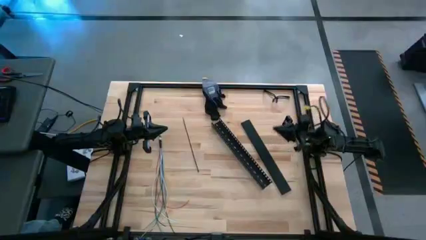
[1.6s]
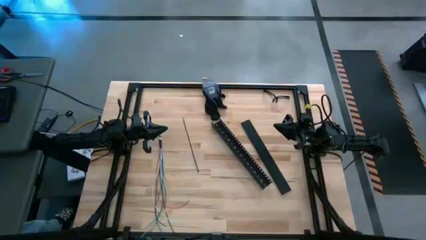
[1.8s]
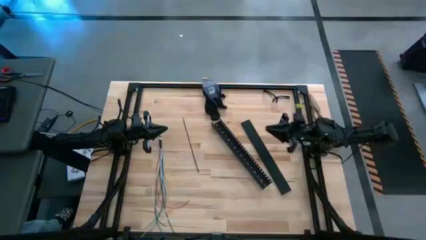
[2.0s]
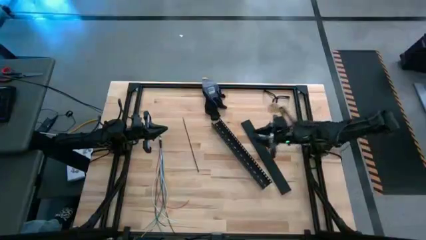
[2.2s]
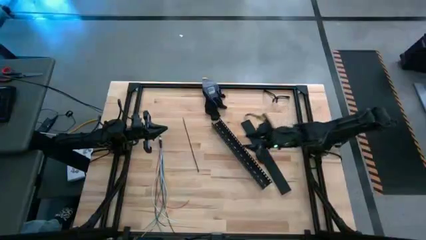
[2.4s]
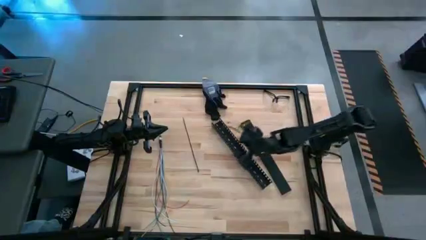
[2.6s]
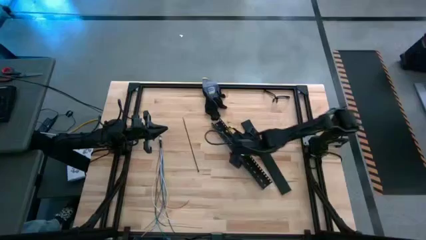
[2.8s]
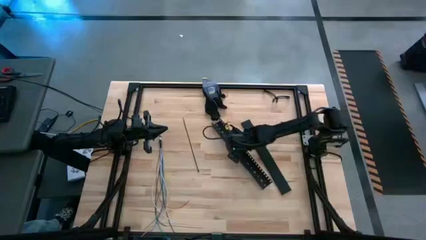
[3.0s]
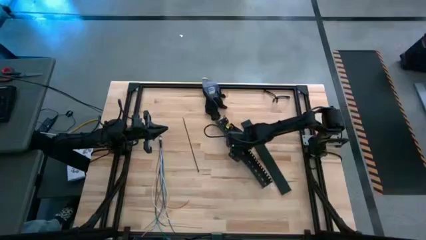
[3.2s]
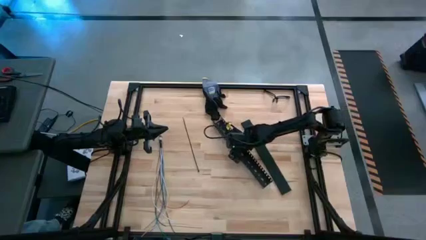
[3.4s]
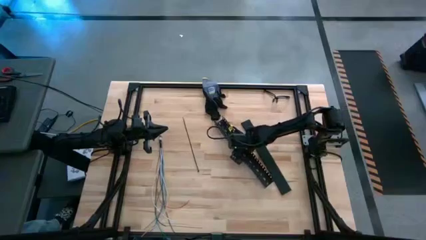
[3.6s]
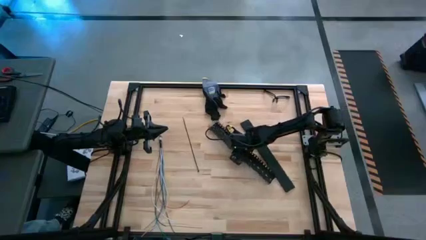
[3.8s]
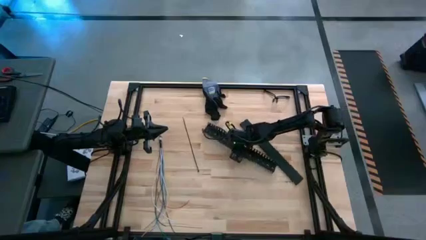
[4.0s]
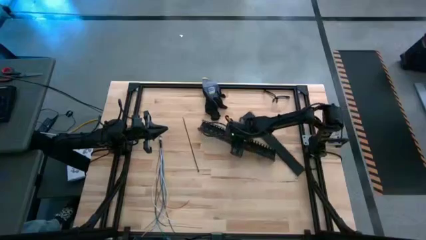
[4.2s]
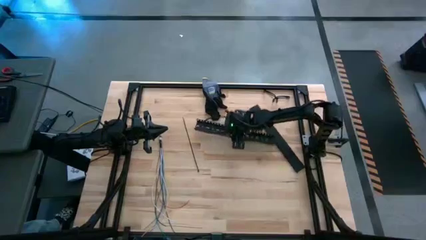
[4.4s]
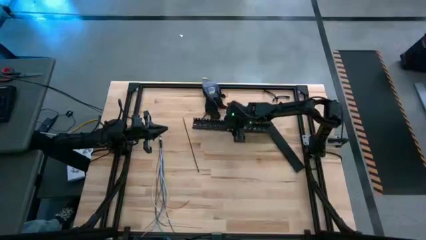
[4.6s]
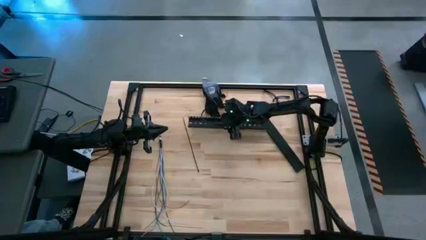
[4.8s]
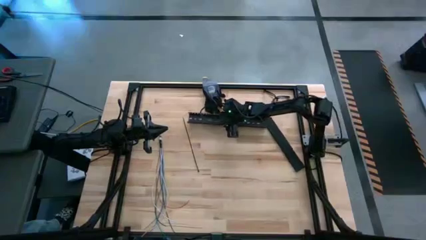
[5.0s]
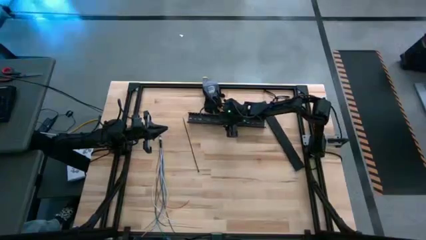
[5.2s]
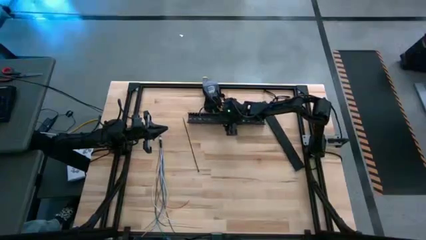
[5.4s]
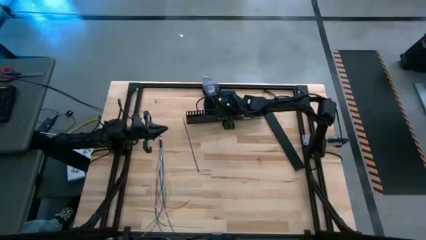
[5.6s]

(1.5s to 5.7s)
Task: Ziptie cables
Move the black cable duct to the top center of the table

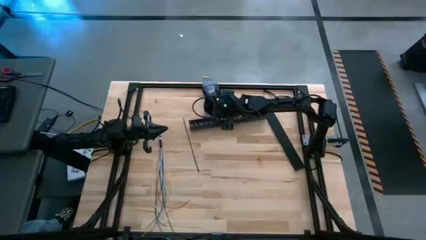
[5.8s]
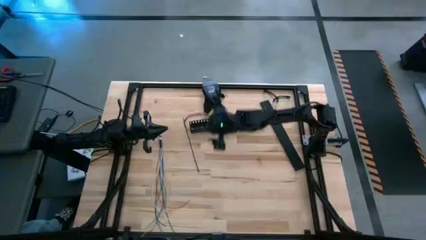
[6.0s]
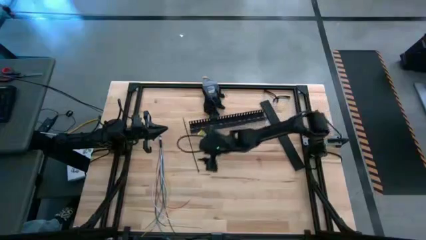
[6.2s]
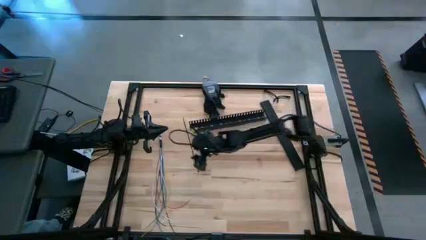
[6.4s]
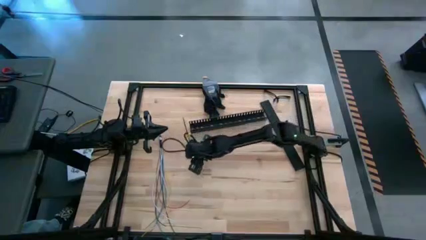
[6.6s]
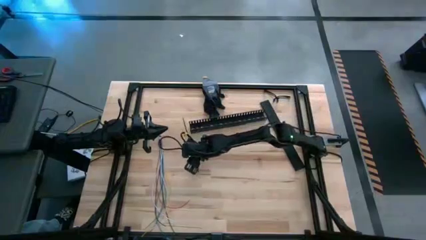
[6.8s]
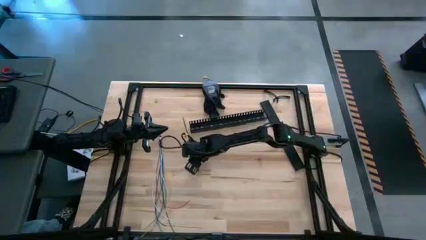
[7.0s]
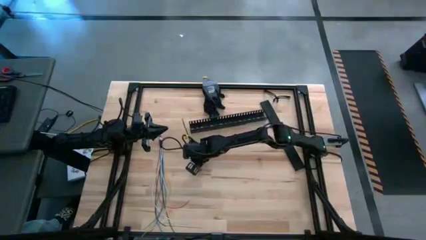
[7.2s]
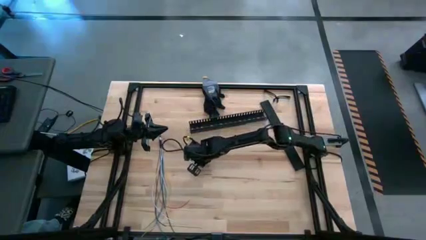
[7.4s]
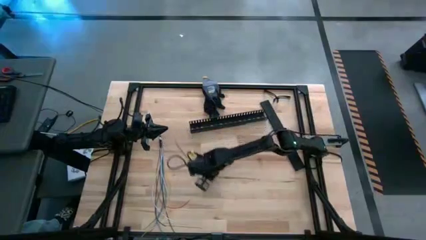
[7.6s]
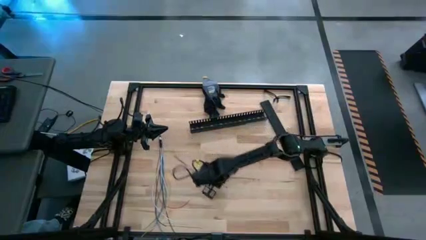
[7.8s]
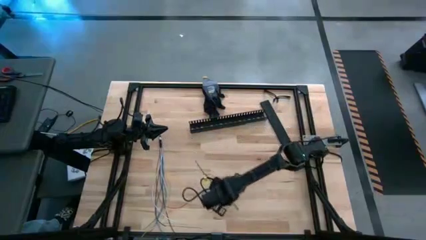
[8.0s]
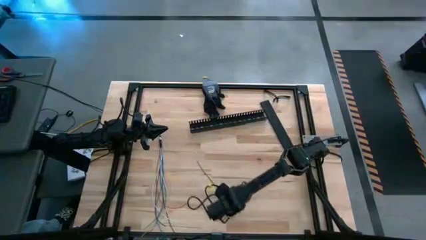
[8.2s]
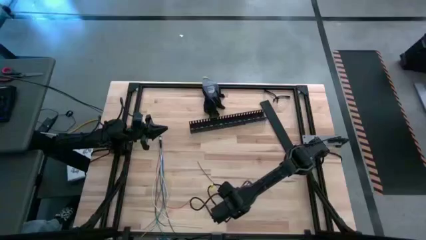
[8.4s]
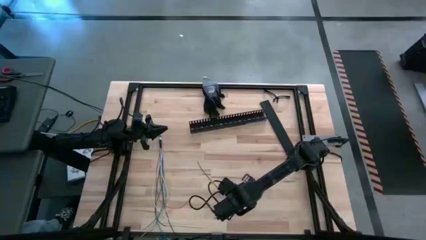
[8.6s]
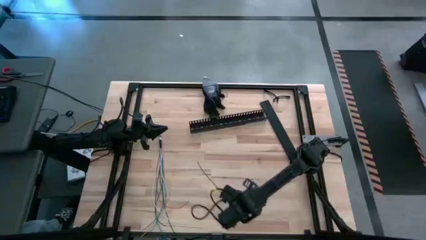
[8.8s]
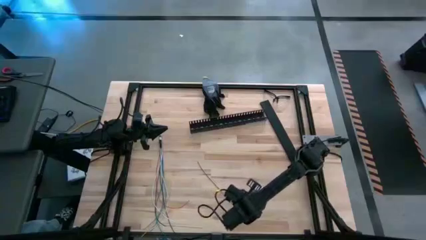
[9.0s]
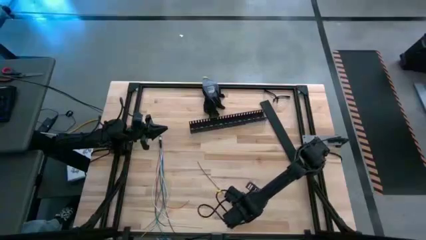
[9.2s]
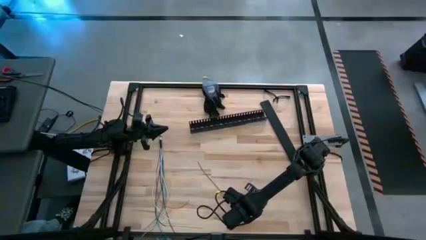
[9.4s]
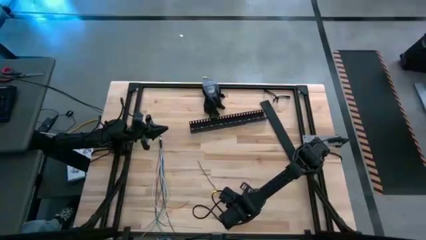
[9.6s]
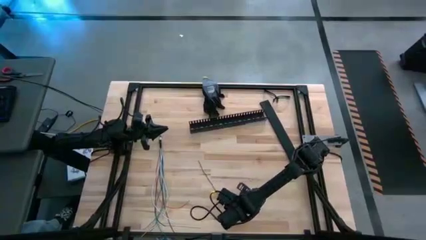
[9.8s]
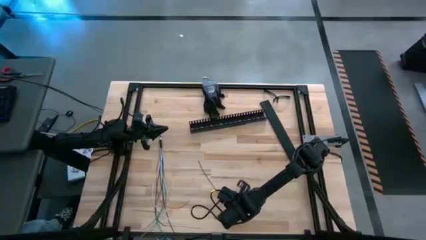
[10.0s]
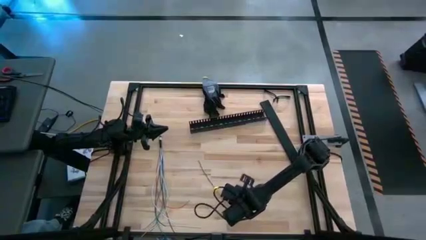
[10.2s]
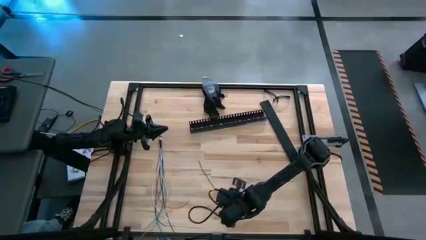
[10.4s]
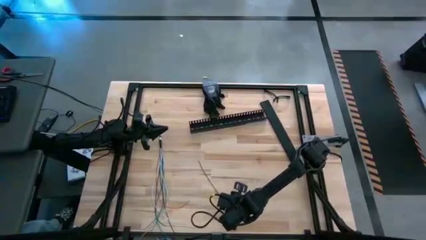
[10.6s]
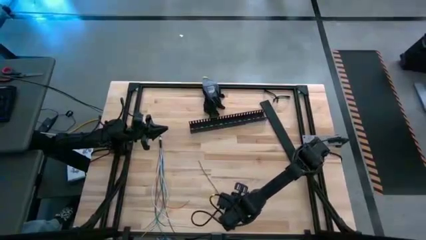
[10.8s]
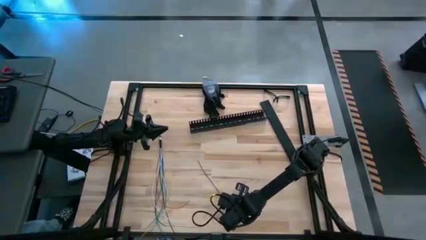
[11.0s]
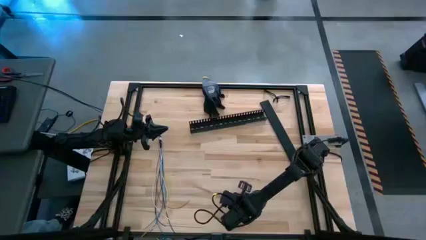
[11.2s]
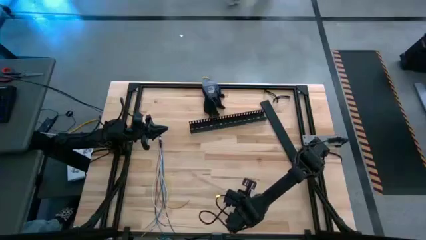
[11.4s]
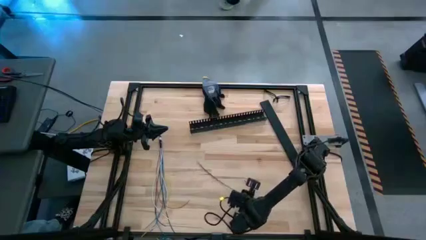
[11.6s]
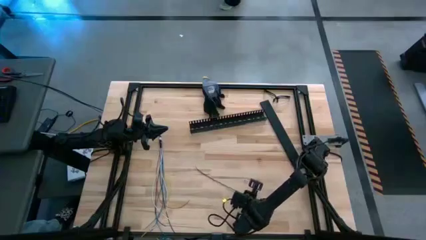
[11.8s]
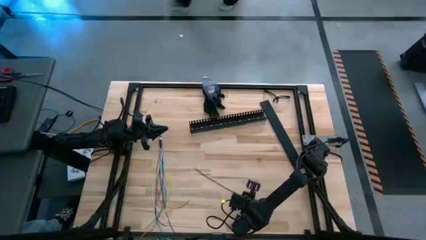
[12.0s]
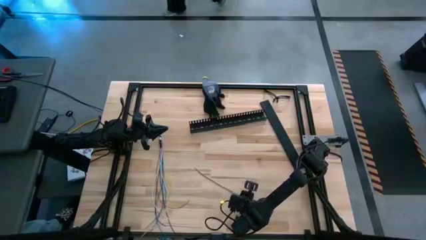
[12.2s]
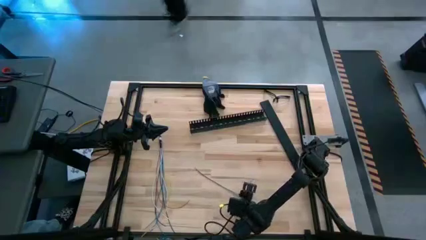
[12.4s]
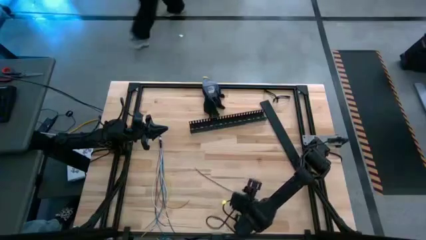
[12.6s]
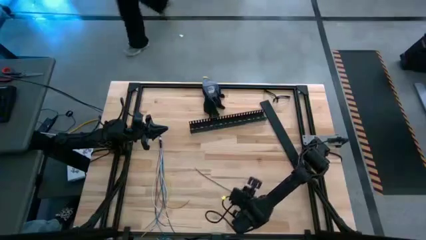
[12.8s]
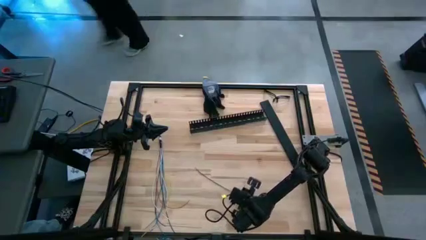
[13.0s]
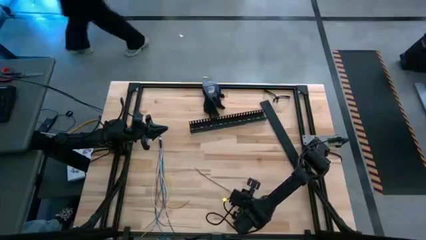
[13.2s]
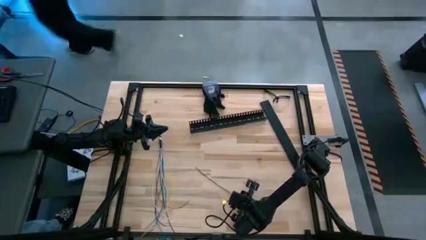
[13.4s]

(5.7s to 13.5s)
Move the black zip tie to the bottom center of the table

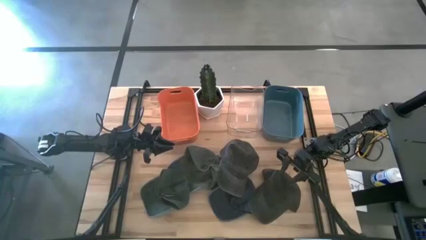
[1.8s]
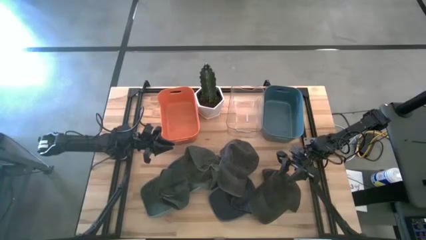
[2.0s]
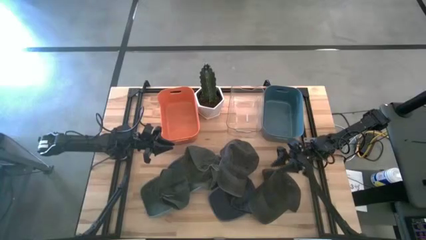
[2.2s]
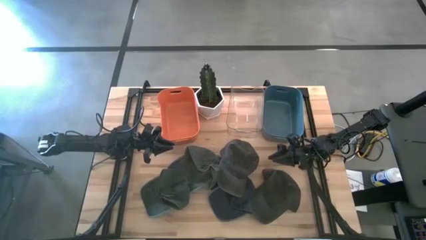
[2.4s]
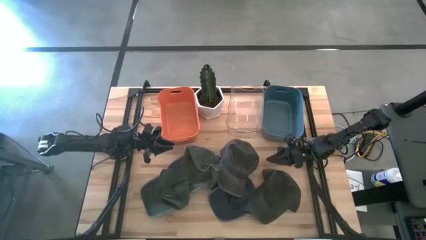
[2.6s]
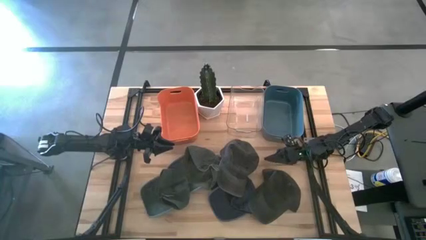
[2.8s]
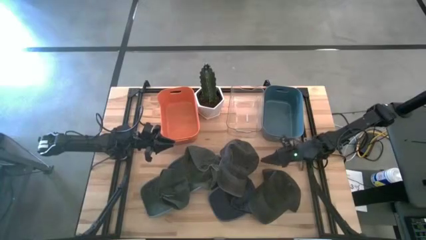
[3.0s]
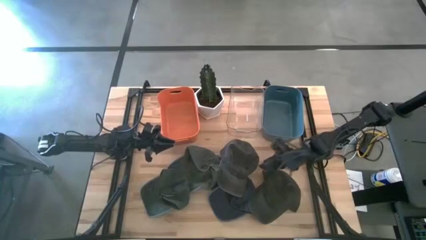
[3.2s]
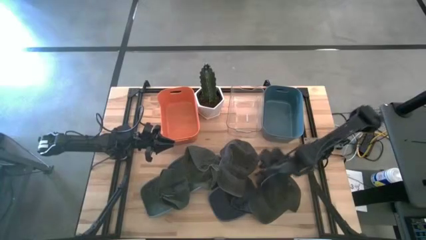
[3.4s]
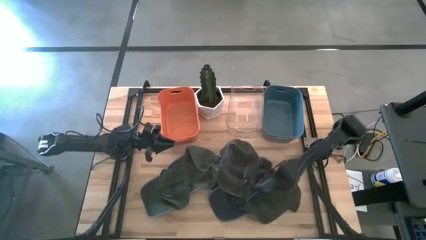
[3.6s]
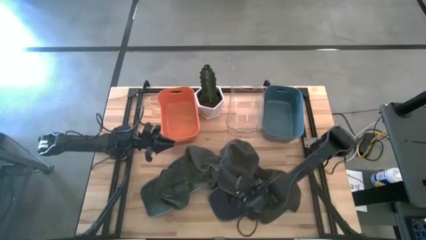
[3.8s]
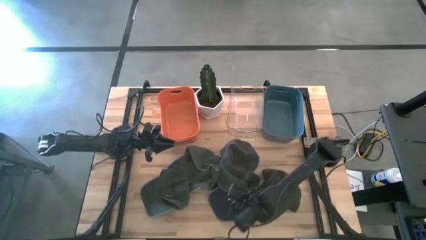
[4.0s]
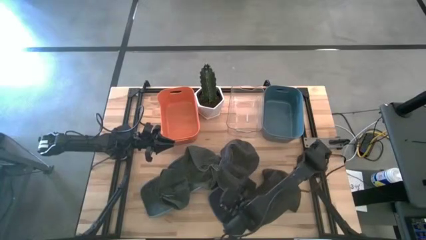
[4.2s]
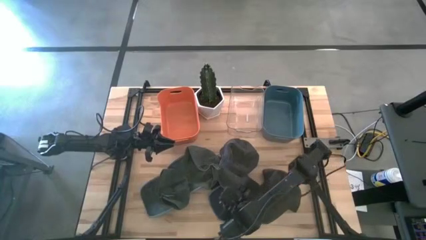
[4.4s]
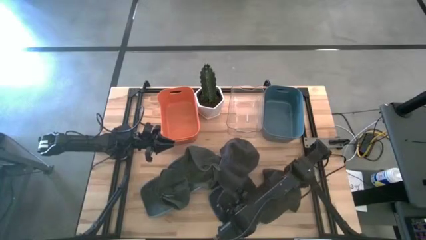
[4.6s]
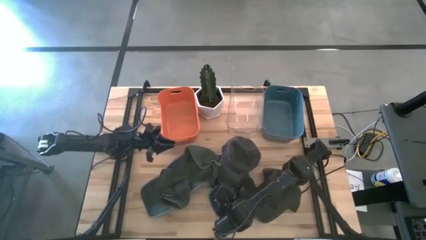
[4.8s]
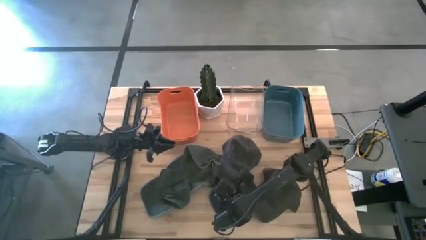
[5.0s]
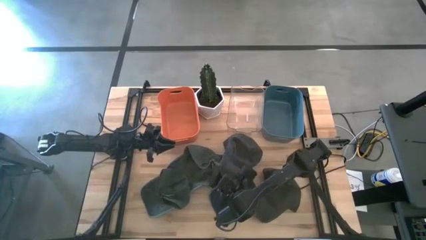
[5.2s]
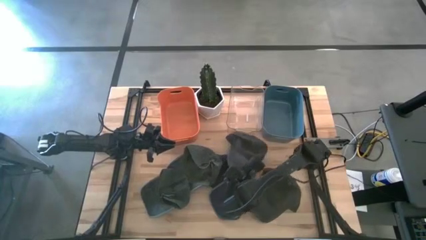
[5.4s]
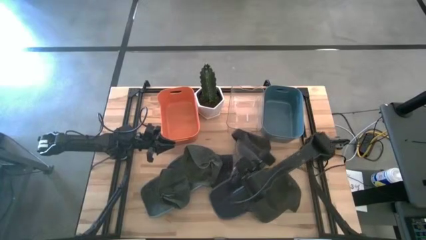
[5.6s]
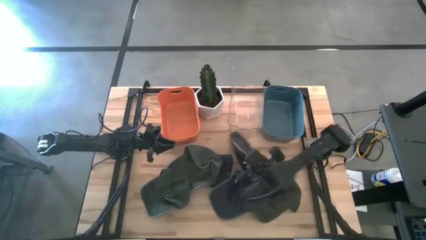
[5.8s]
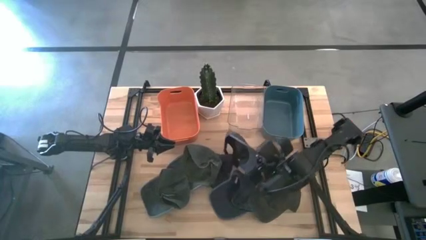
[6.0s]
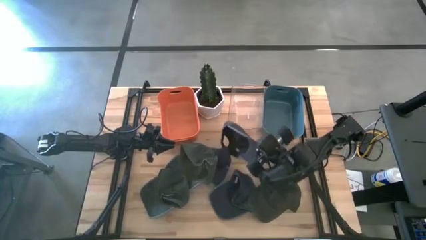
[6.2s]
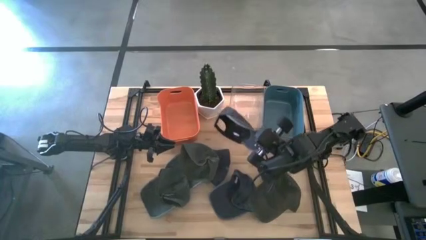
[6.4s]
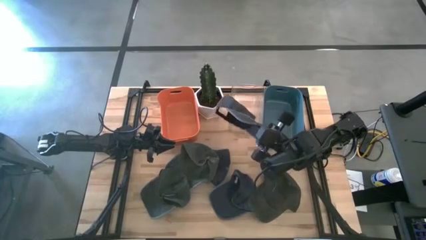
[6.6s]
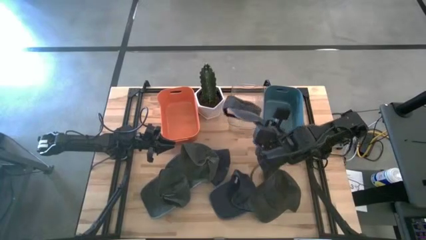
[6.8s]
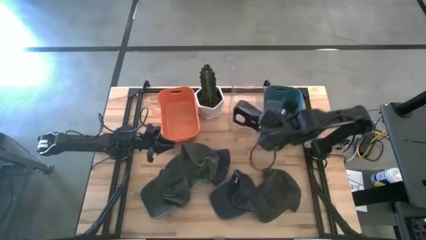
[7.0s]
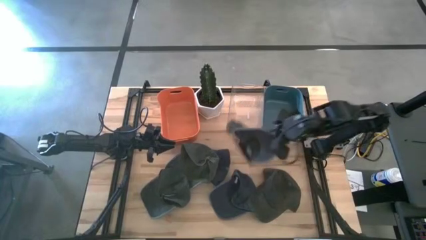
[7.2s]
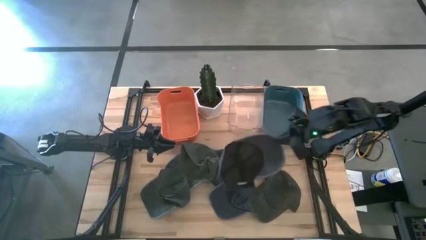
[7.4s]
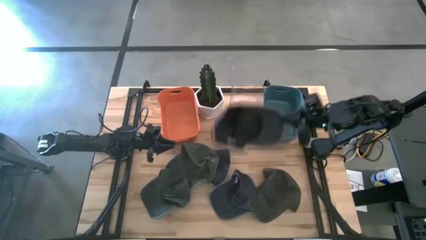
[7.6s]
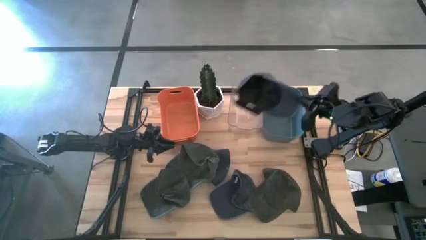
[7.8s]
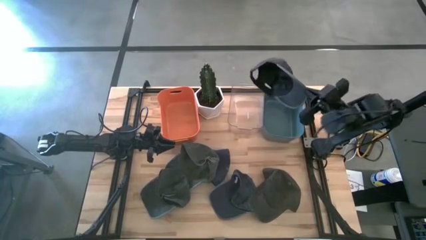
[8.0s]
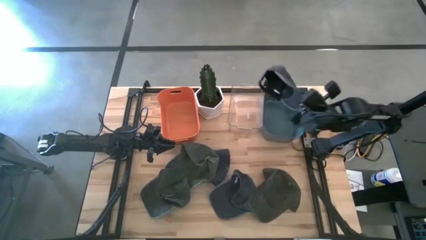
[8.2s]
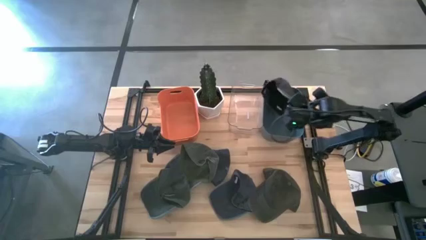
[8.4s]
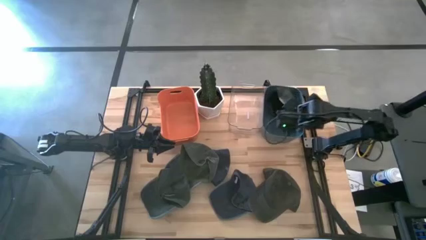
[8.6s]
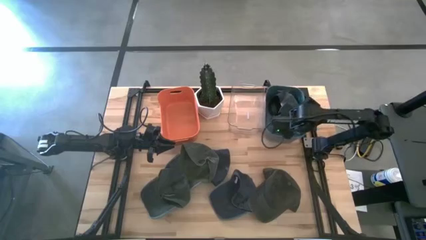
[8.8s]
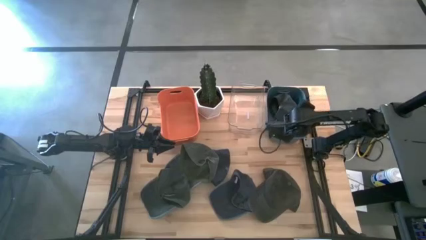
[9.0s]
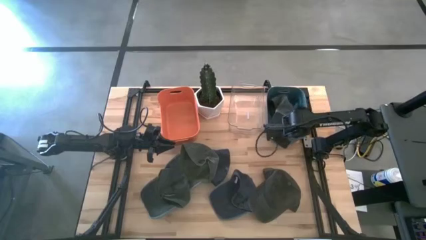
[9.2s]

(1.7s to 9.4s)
Task: Pick & Place hat
Put the left black cap into the blue bin
